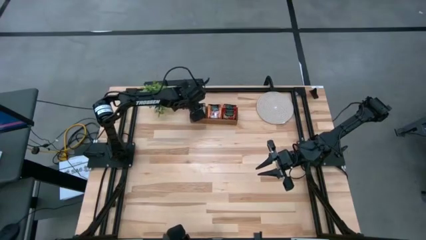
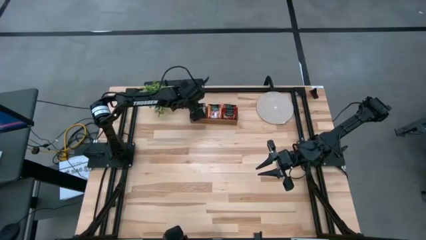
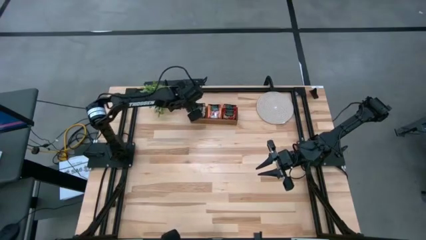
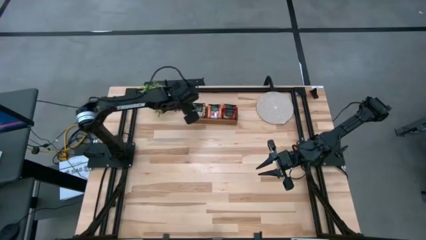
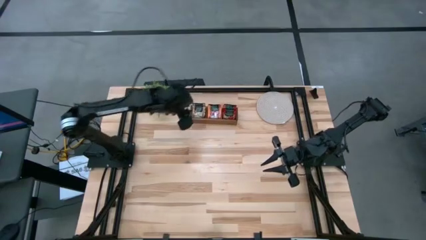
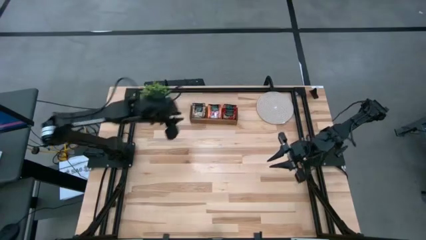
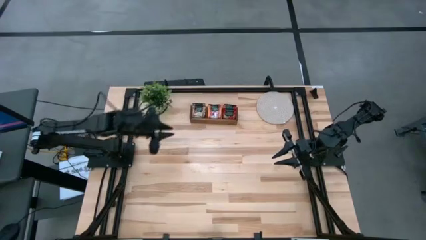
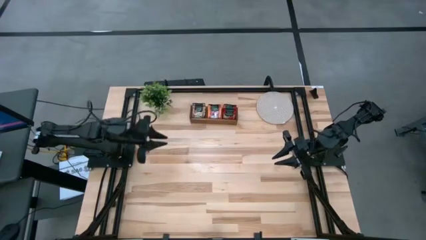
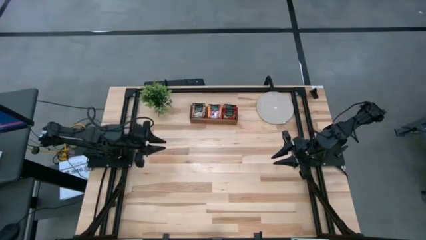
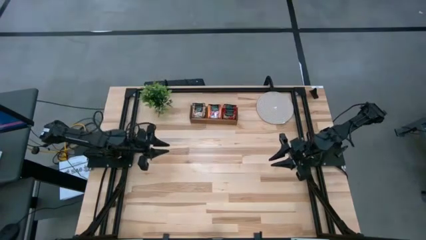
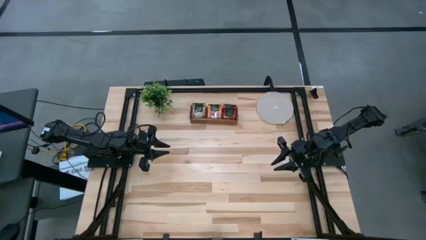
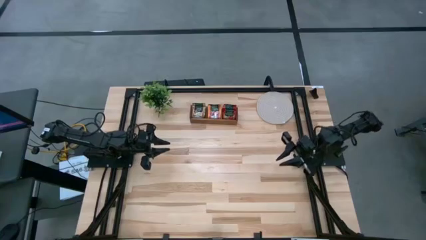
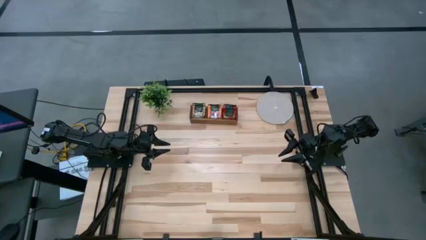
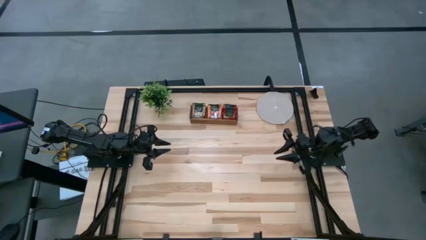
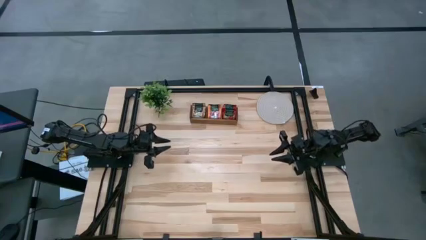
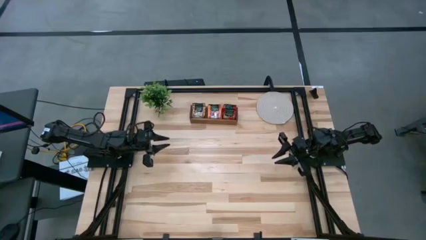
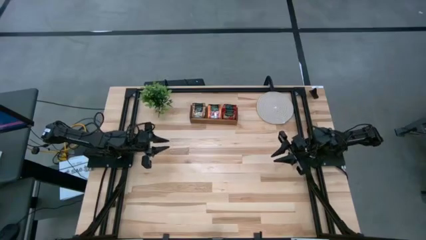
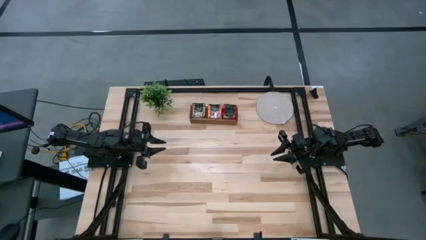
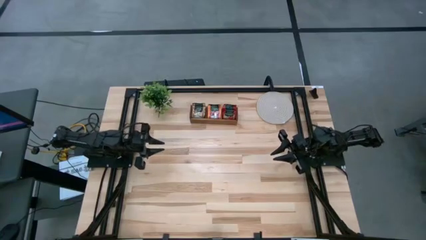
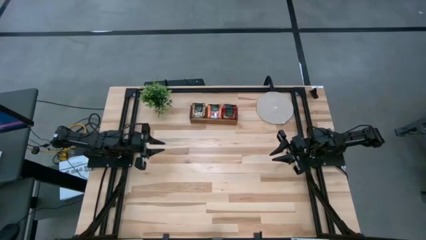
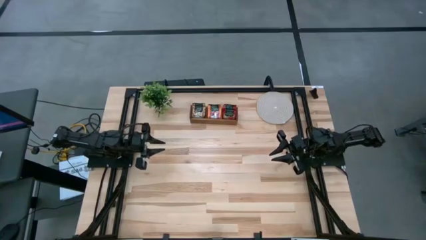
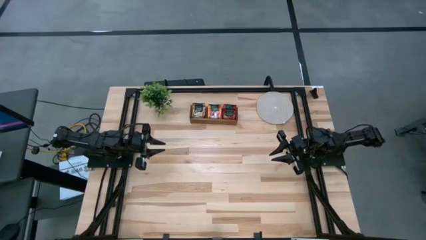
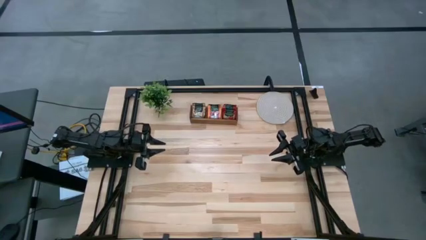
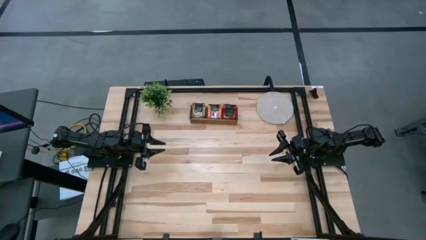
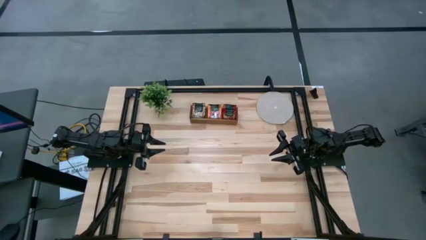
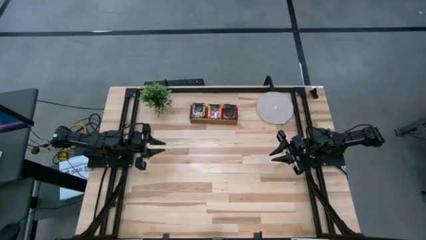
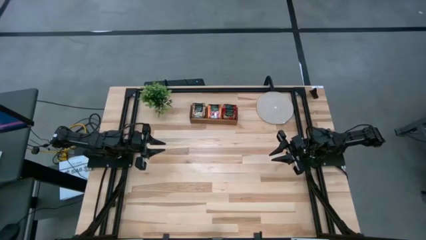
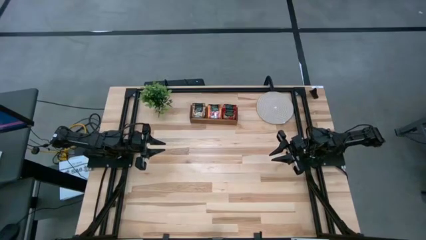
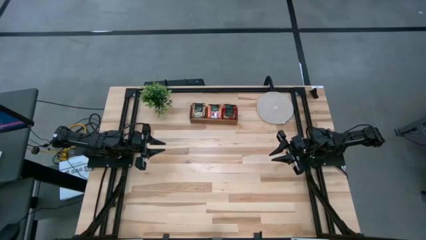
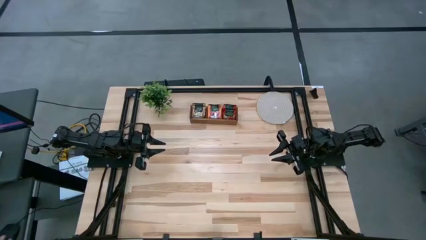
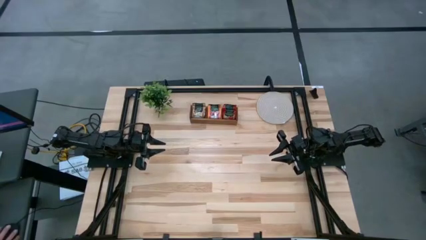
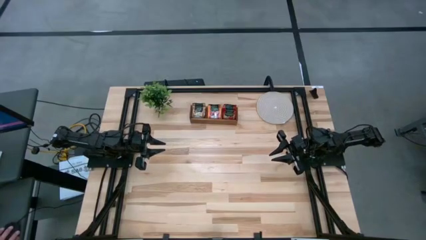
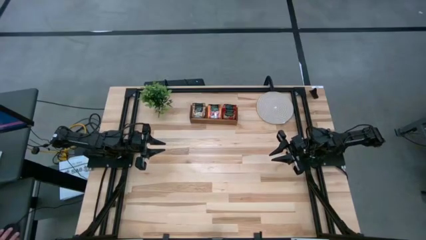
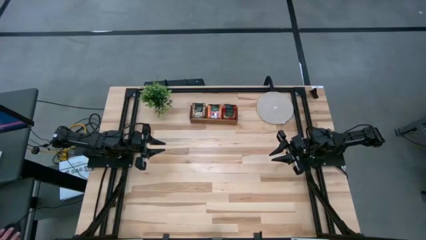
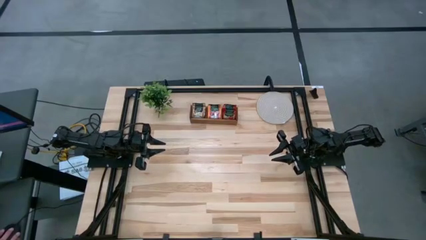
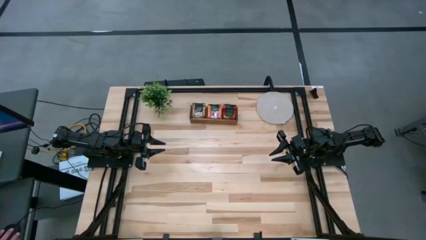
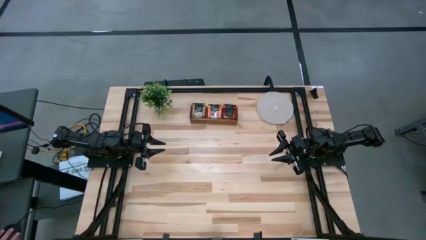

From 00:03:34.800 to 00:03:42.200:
Task: Pick & Place Tea
Return to Home Position

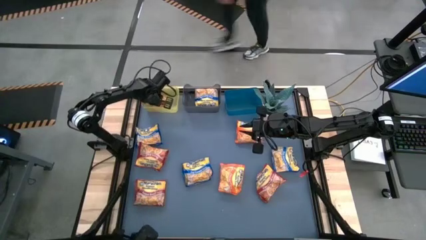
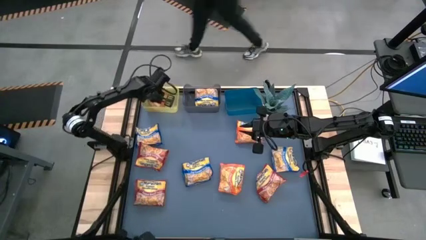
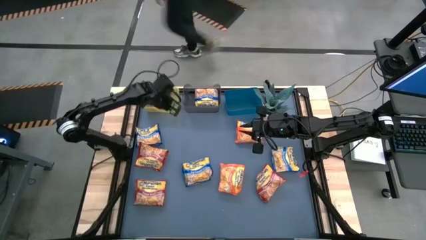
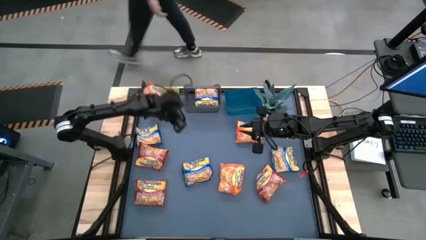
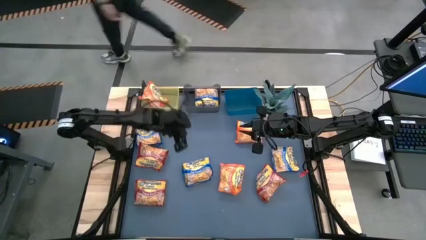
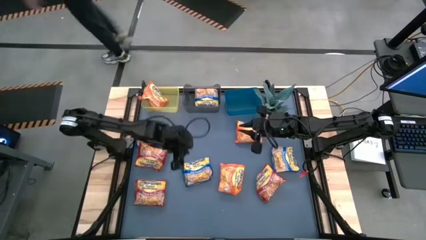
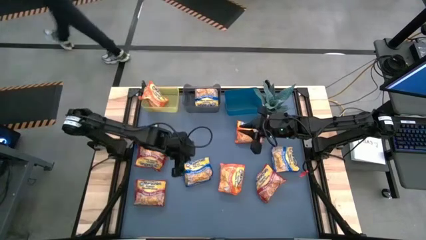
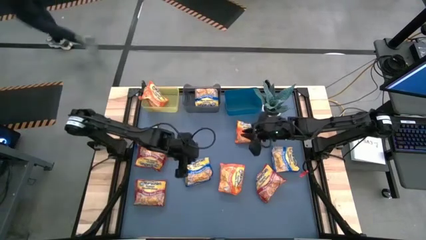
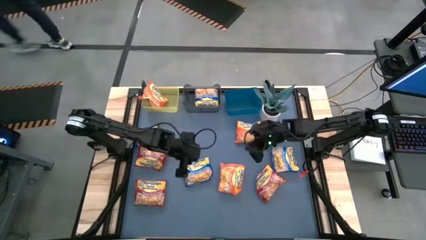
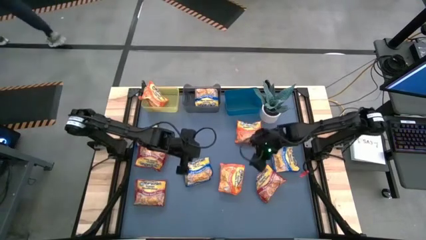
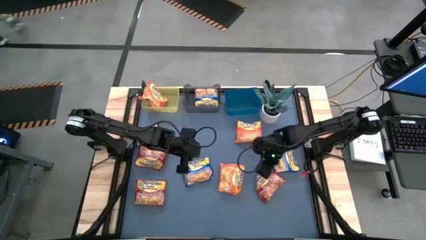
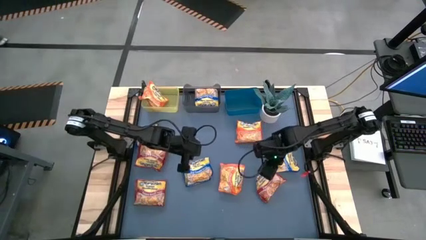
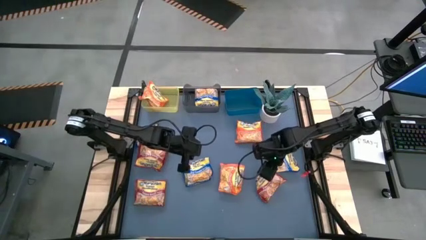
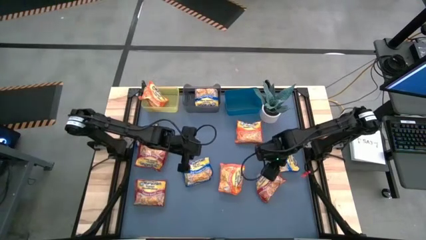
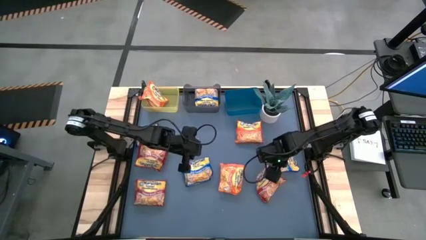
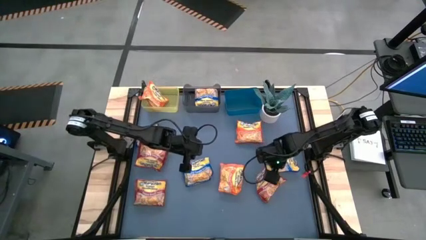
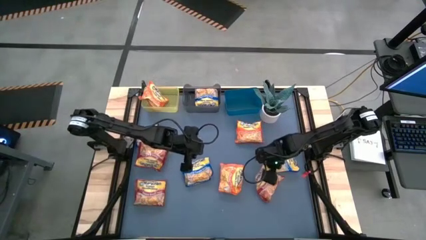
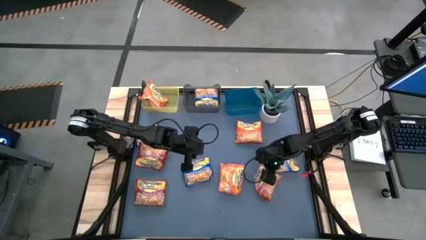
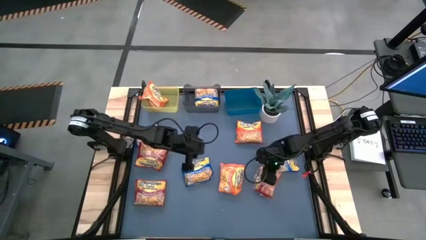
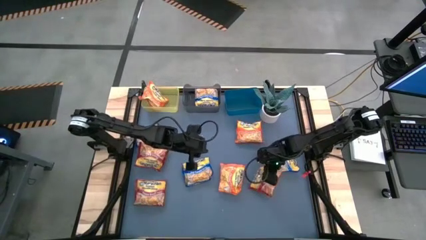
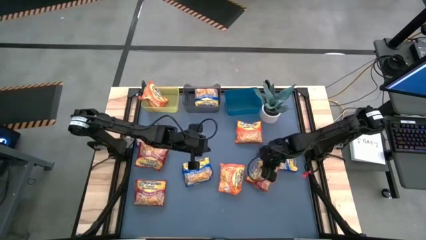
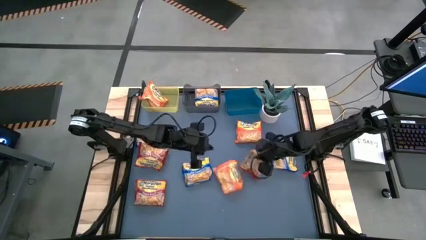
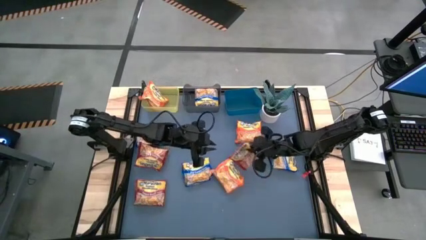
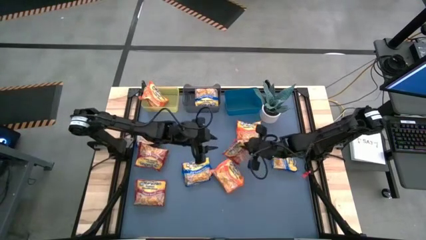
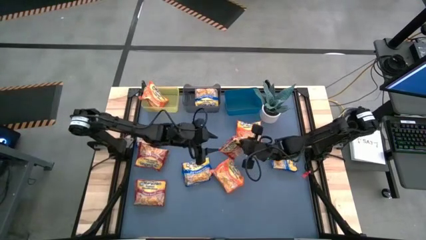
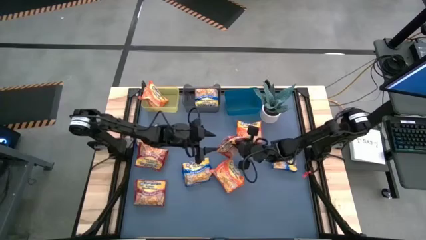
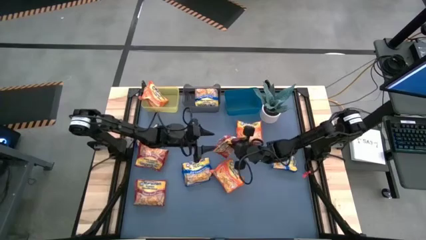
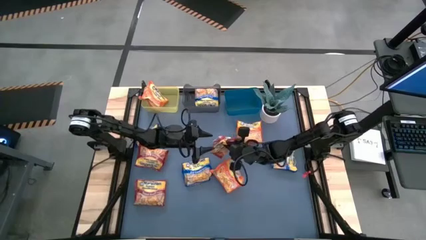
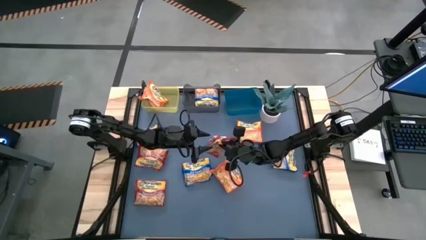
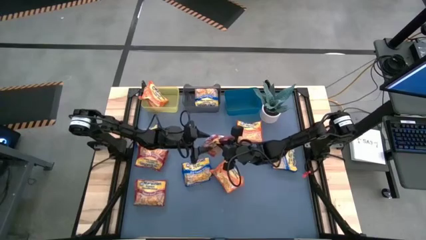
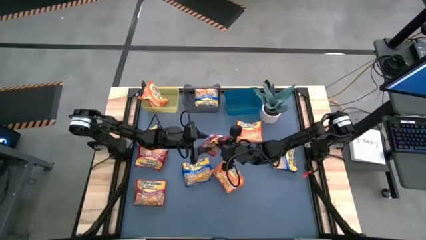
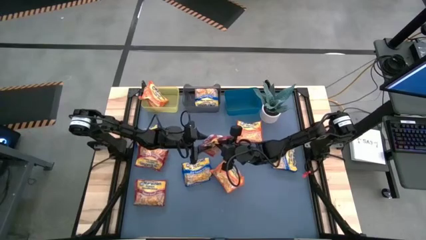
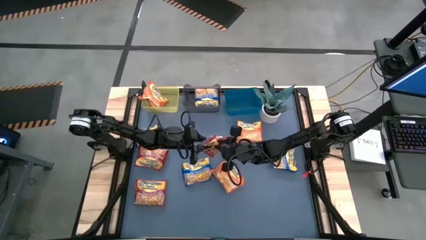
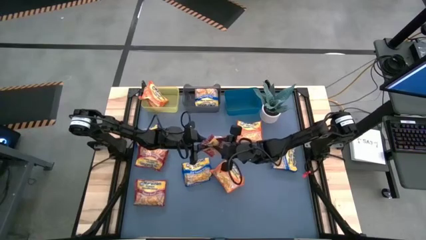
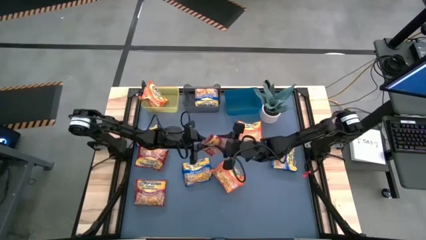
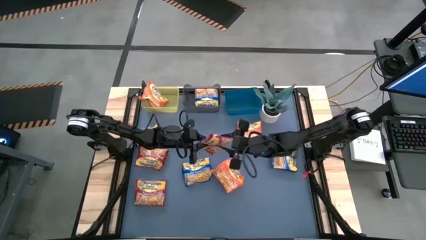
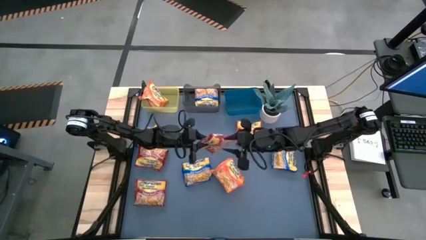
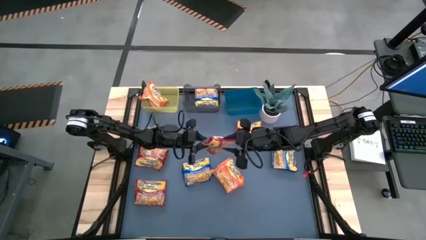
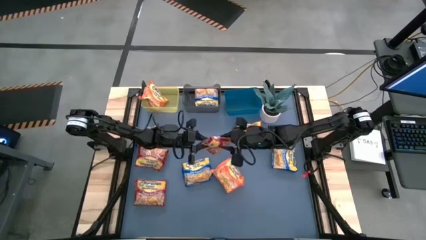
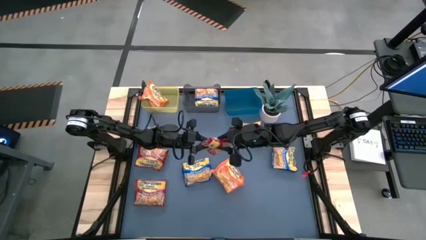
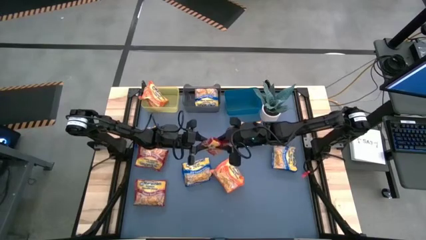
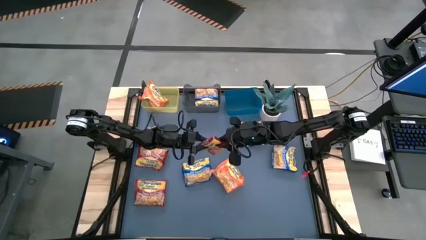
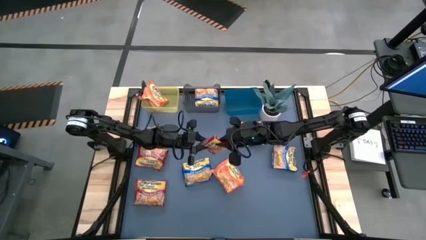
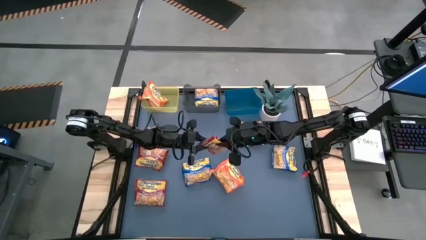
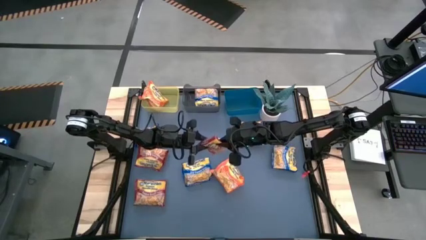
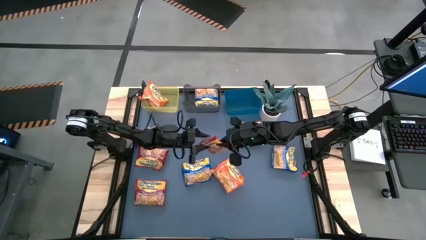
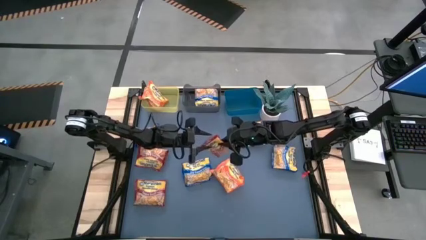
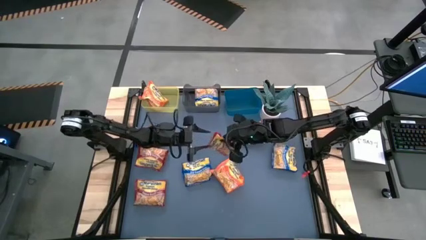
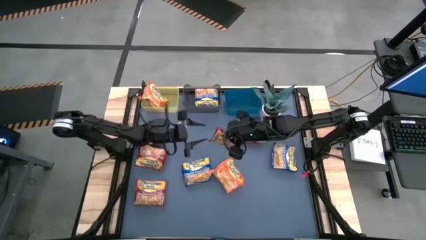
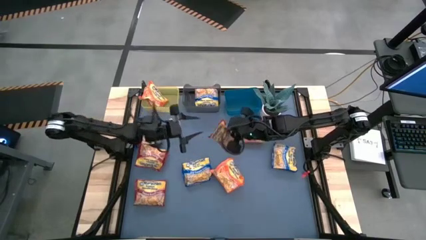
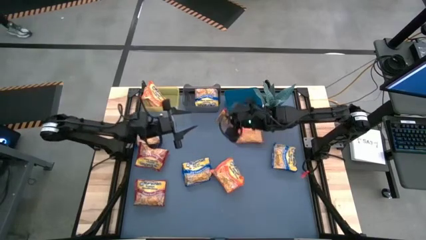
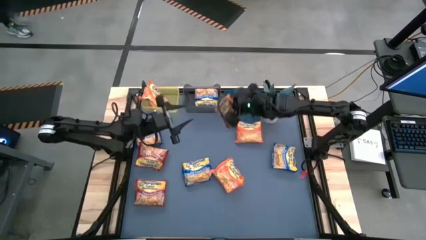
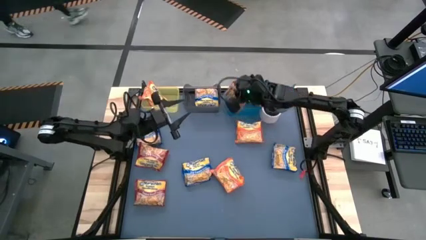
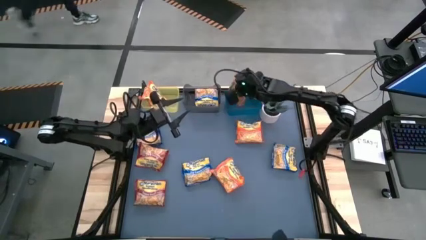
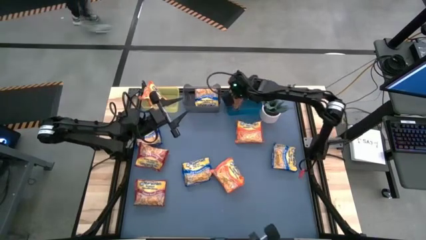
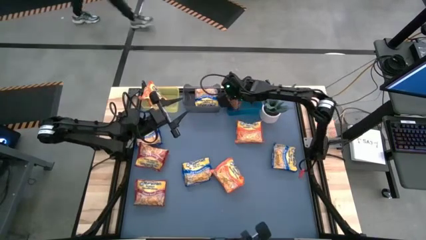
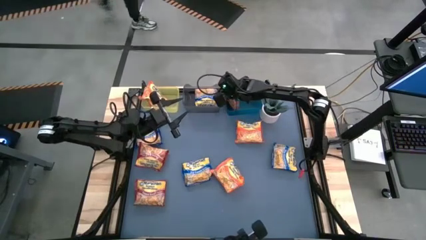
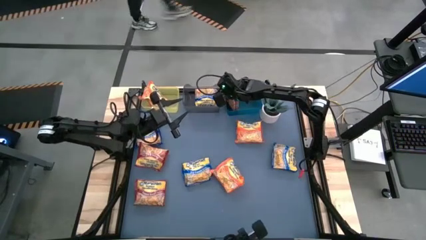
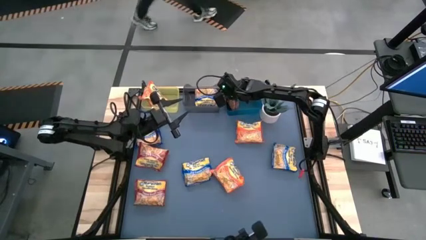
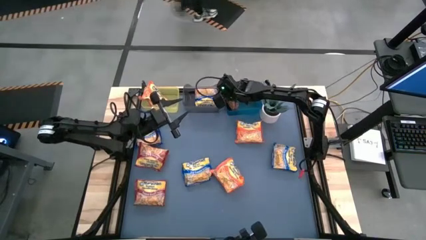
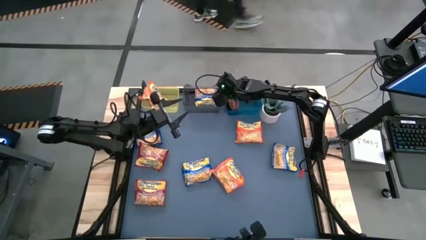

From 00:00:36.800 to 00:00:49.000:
Task: Sort Maruchan noodles
Put the red noodle pack into the blue bin
